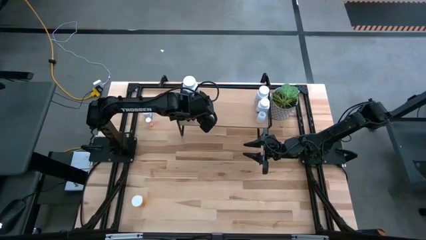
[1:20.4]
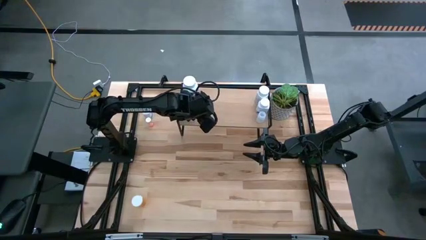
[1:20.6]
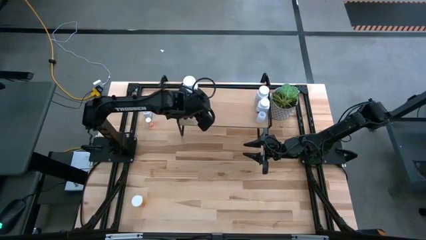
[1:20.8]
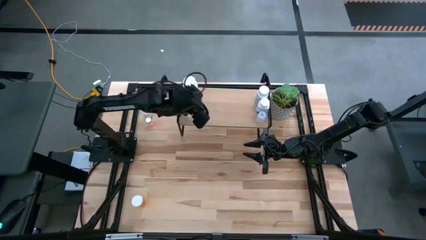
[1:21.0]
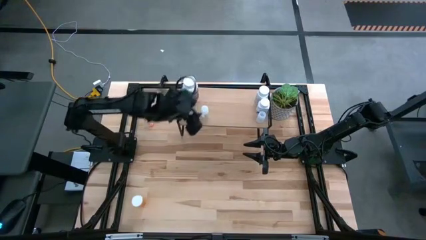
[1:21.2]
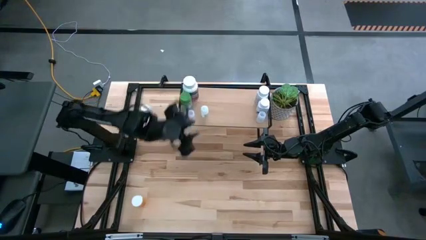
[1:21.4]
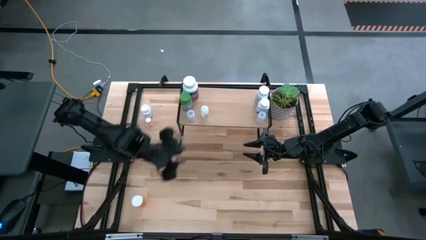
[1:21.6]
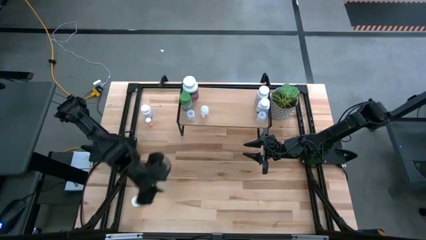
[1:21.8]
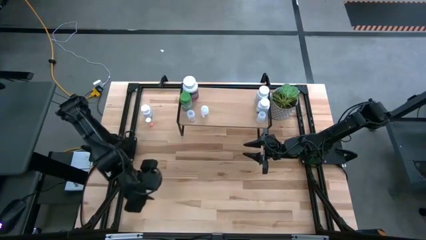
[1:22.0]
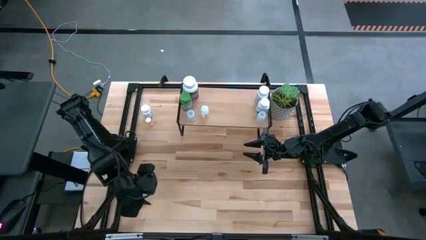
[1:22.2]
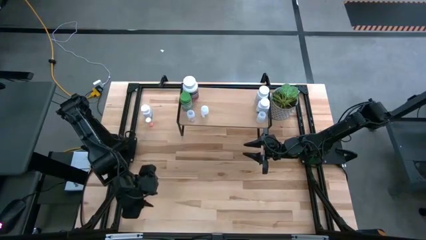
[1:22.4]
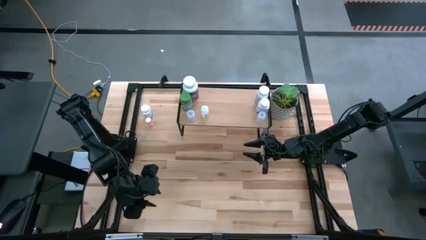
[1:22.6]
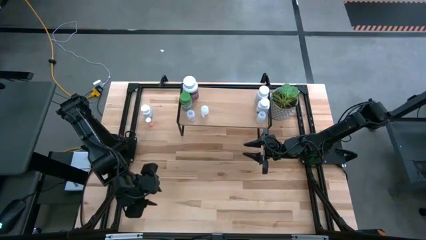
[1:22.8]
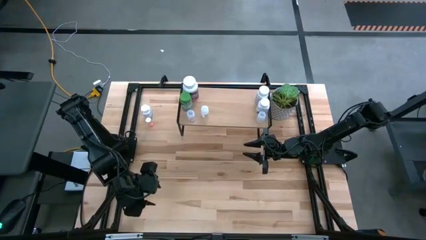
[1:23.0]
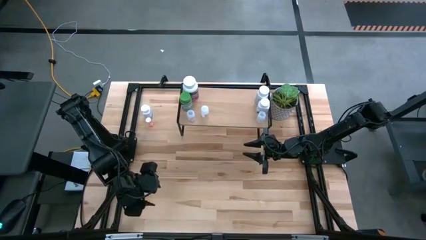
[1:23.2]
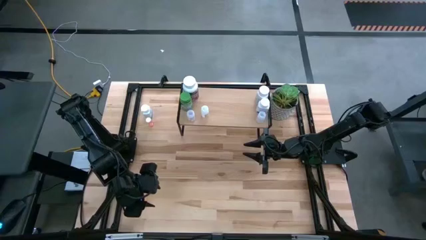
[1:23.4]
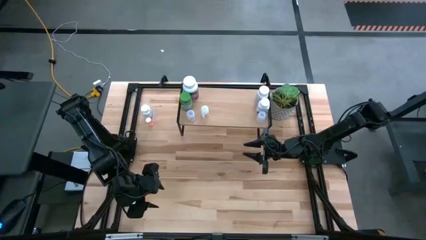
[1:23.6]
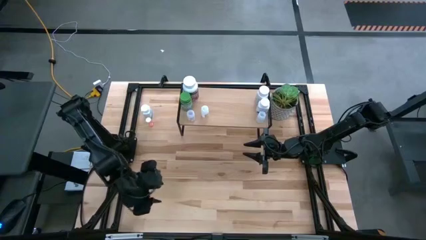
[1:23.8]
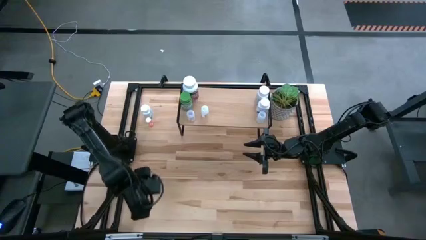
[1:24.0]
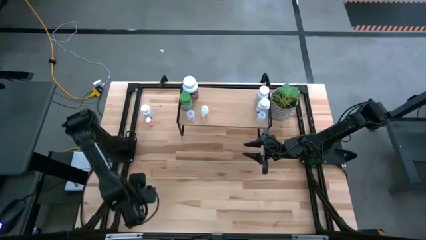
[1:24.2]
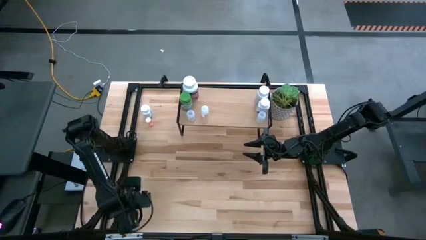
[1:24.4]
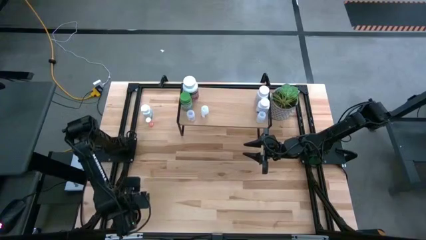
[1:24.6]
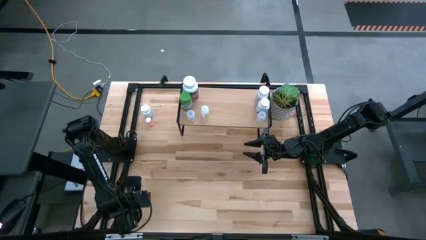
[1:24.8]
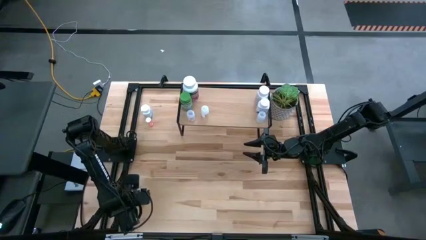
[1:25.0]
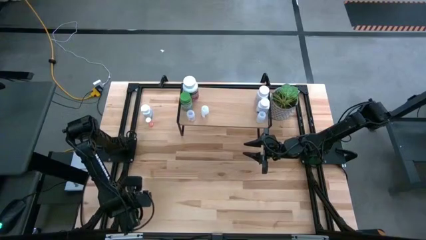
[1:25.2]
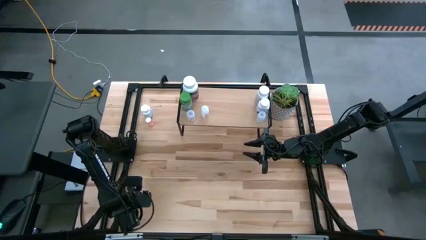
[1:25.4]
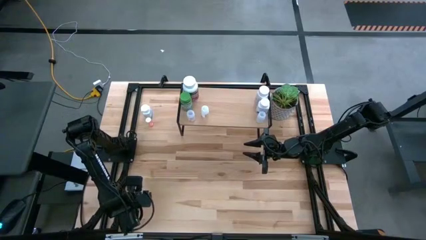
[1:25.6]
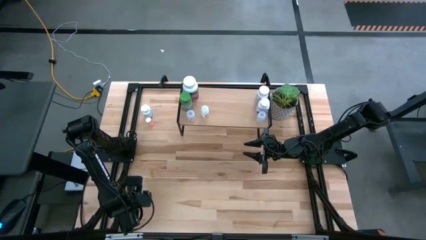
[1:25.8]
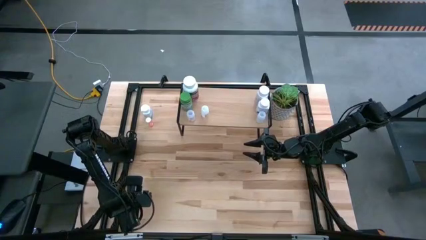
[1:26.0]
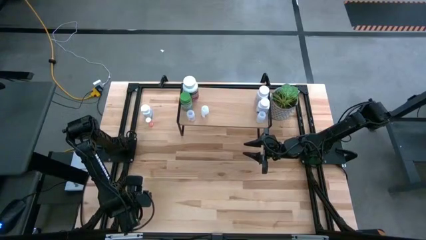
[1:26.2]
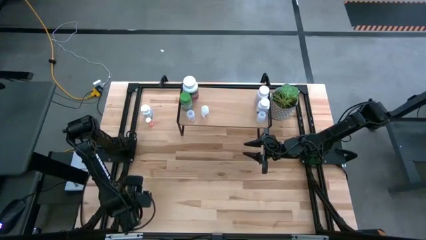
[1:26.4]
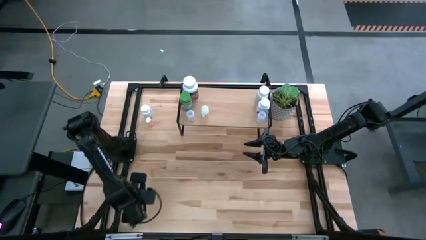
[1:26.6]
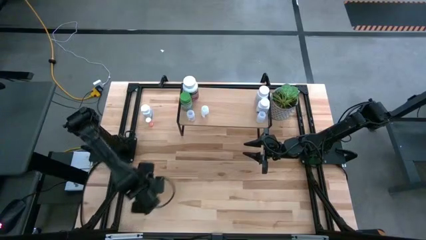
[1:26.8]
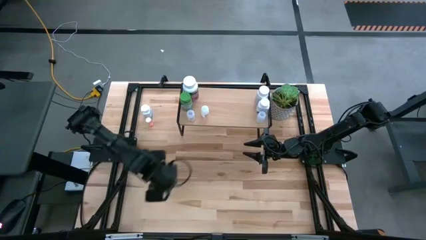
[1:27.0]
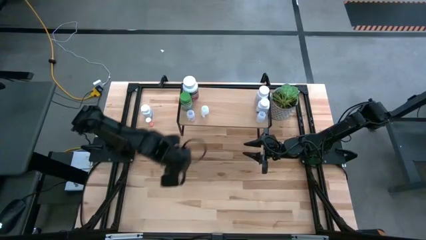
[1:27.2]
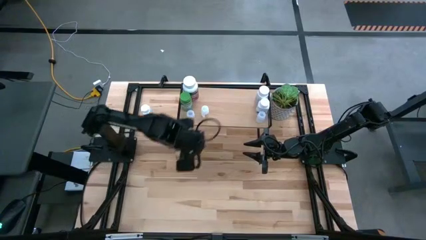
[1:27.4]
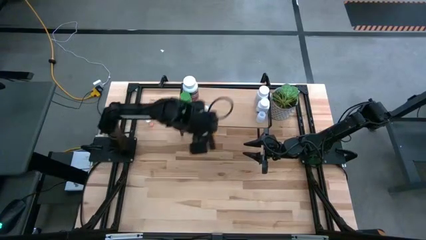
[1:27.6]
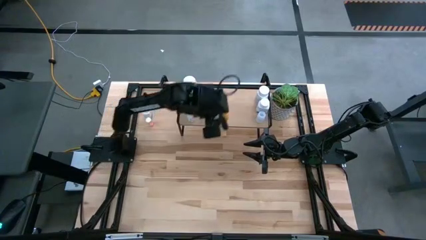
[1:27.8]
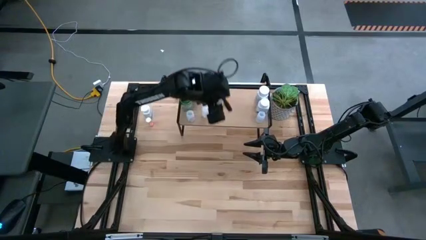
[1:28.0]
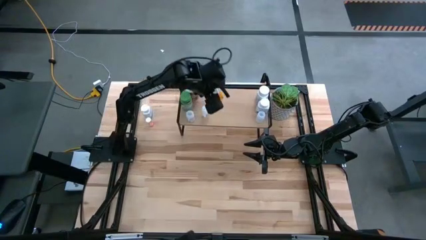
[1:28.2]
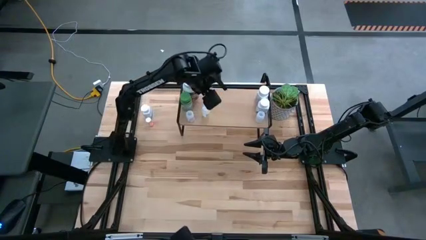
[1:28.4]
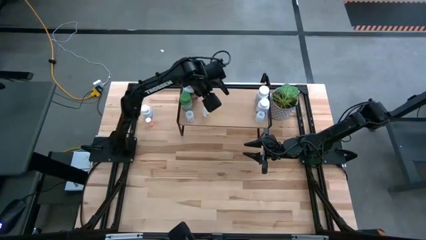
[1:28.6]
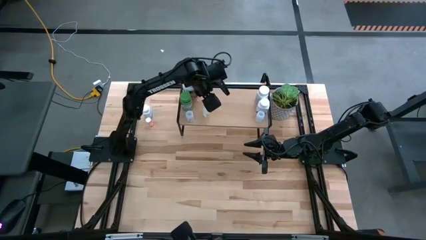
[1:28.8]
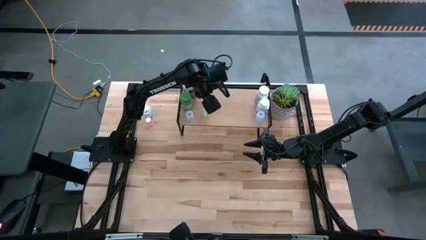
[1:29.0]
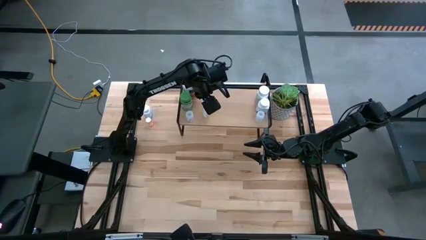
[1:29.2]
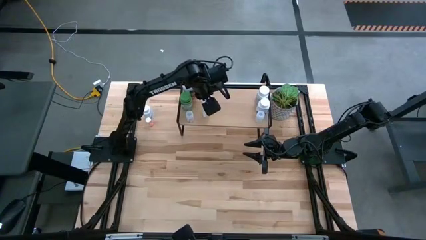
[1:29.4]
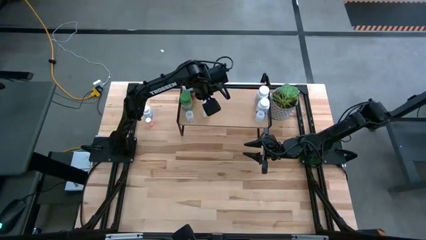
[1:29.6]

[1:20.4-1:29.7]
Task: Pick and place medicine bottles onto shelf by color
Put the orange pill bottle on the shelf

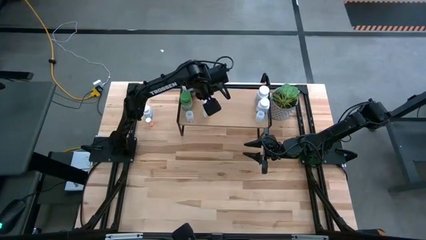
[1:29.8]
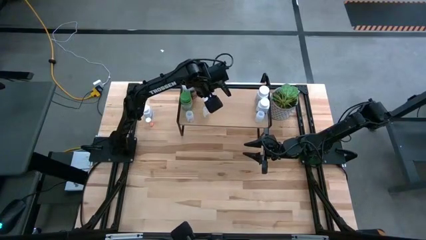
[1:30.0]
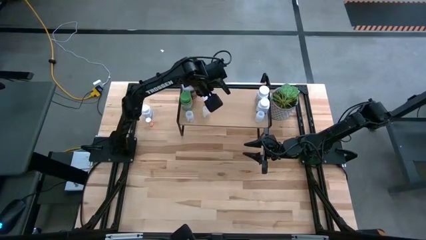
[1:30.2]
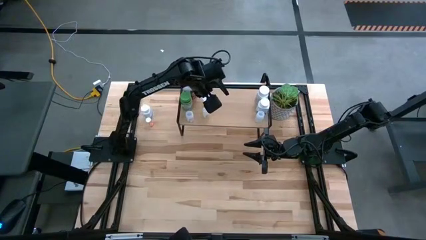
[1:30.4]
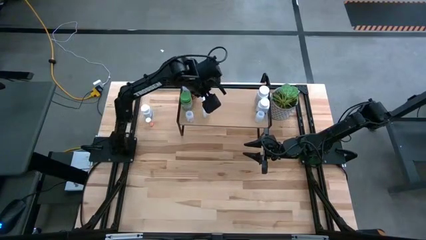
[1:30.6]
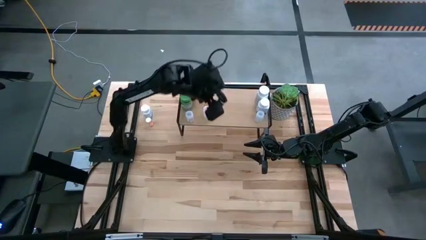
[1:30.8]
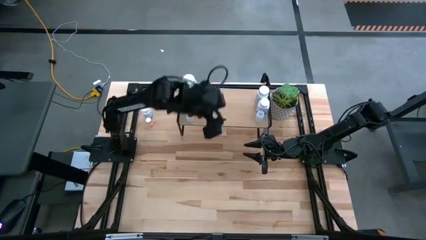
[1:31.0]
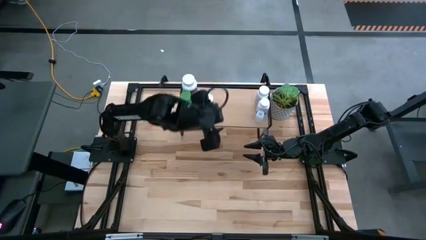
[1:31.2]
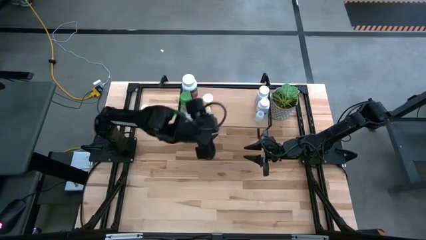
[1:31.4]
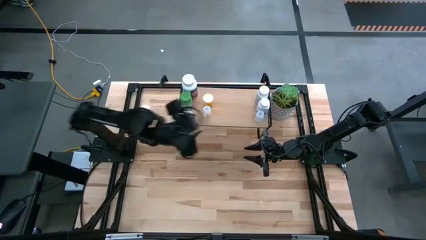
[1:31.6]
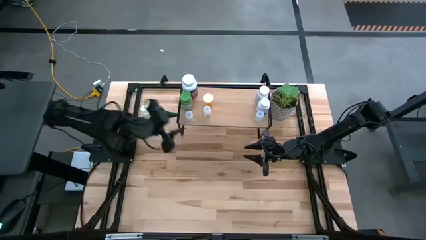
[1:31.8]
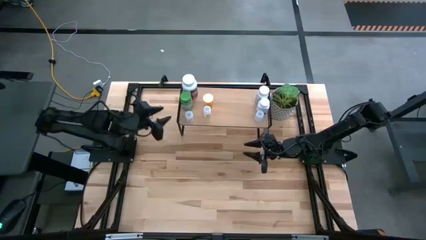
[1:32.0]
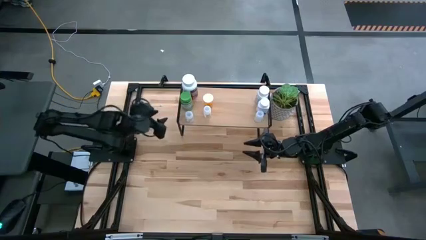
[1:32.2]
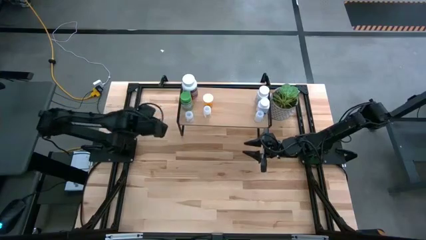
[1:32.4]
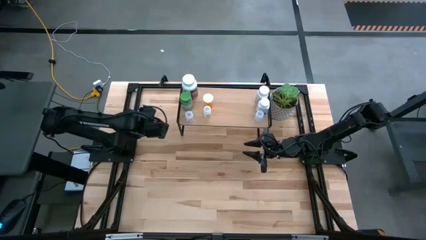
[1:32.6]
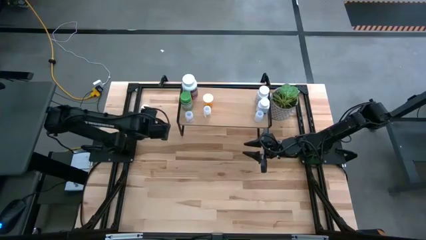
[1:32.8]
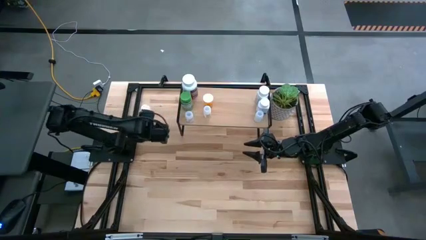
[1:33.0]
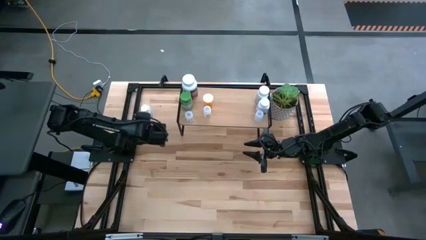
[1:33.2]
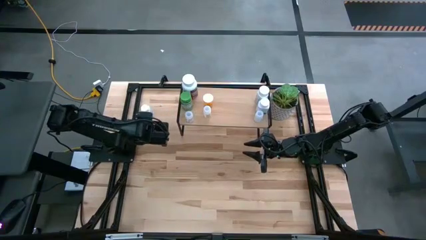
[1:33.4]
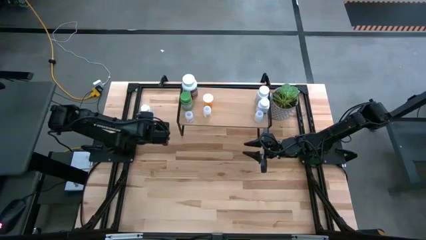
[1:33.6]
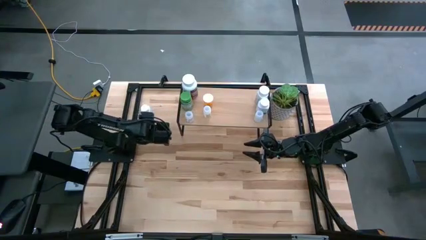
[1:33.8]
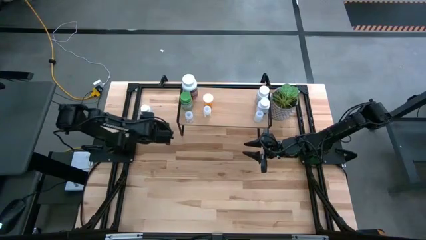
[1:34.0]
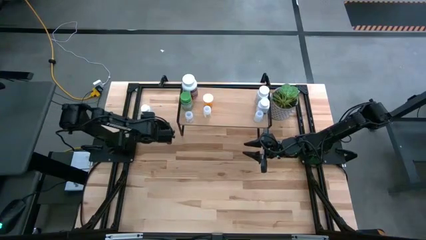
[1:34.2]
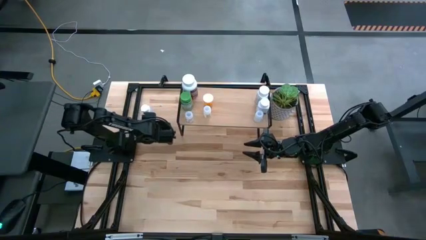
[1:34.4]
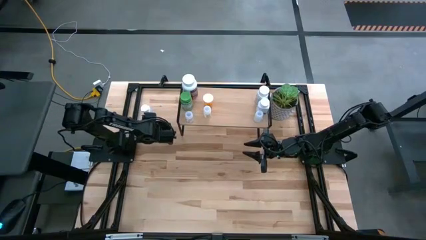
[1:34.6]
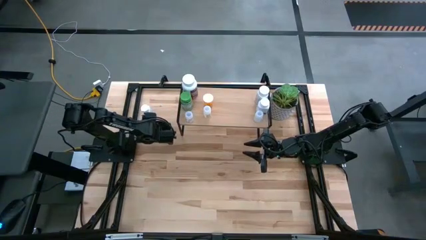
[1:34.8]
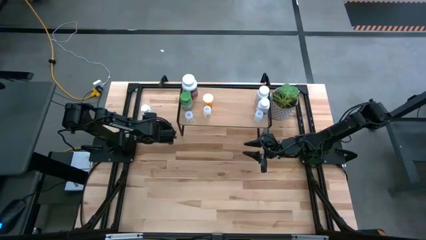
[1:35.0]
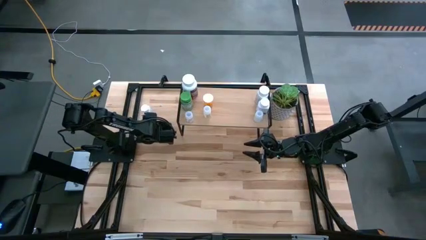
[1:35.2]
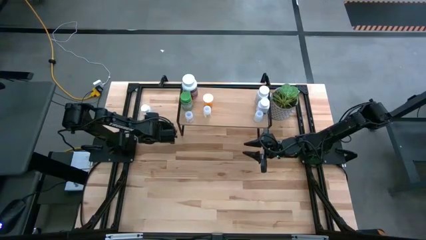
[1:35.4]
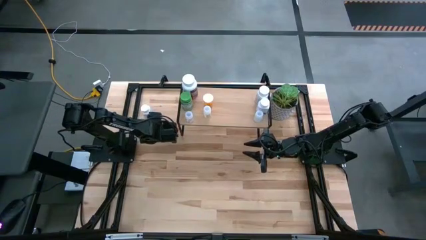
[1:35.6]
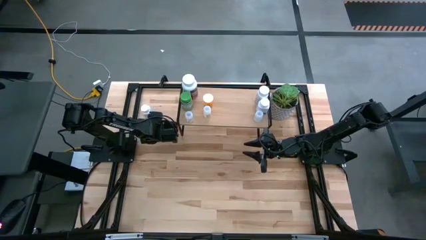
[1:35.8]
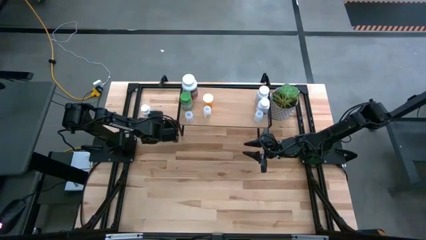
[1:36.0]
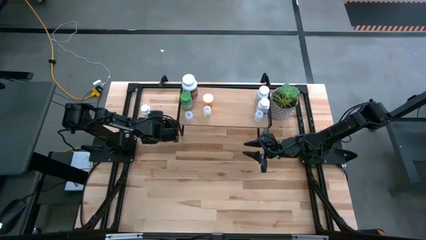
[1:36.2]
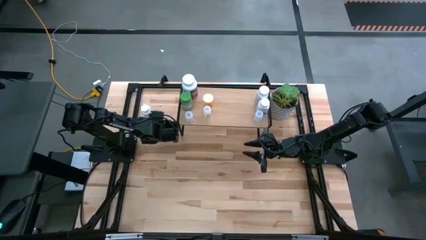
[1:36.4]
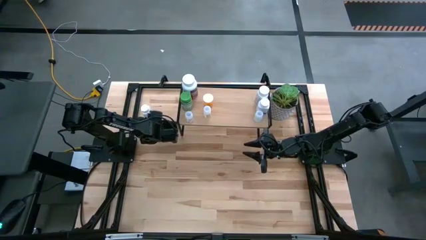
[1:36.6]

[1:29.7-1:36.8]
Put the pink pill bottle on the shelf
